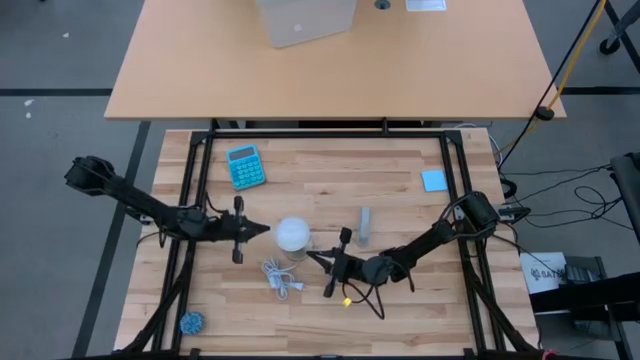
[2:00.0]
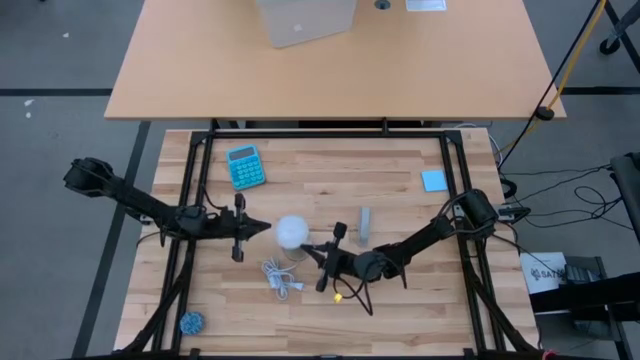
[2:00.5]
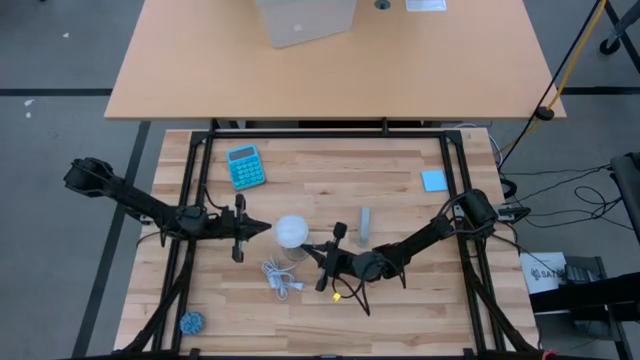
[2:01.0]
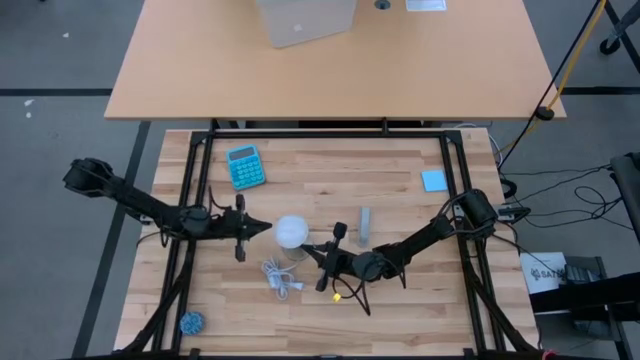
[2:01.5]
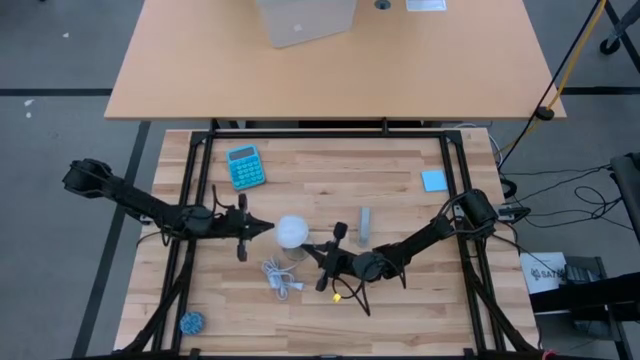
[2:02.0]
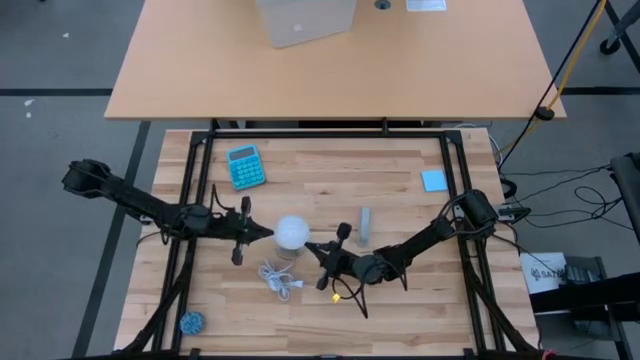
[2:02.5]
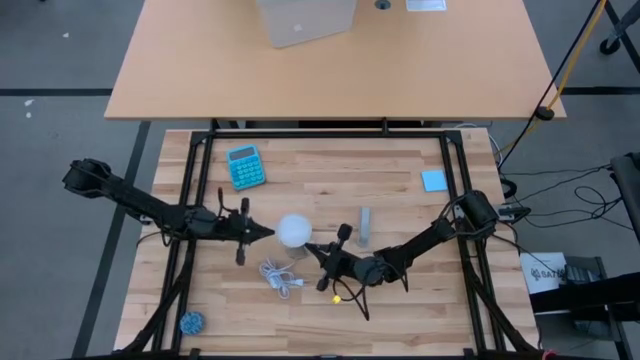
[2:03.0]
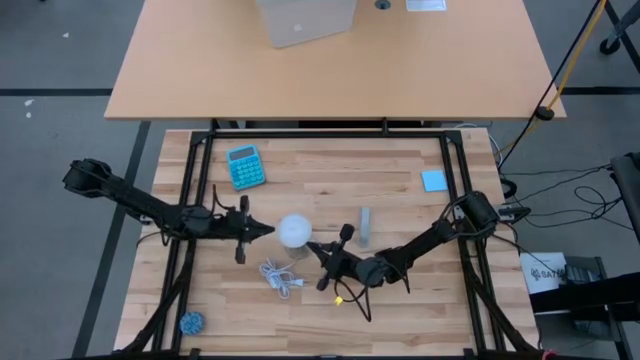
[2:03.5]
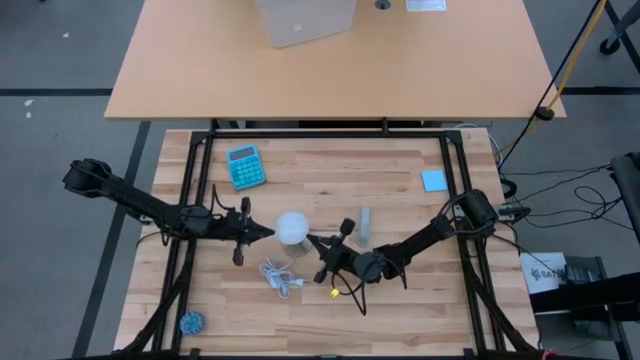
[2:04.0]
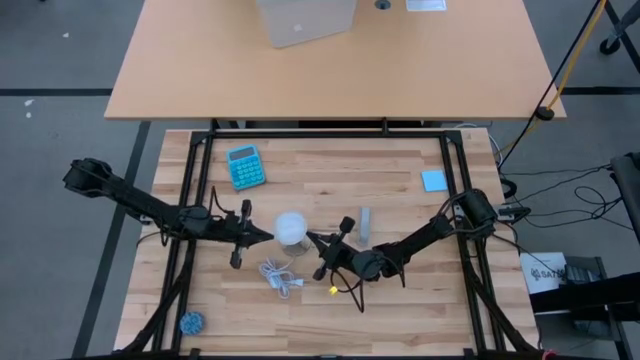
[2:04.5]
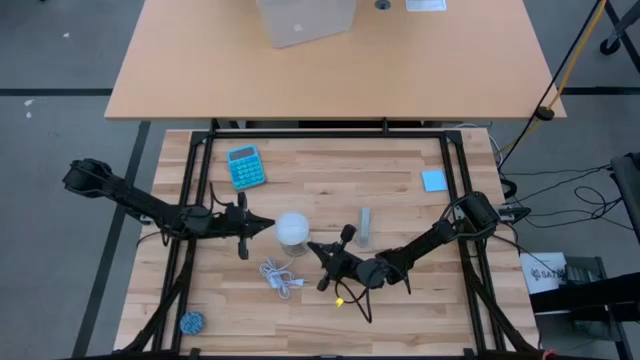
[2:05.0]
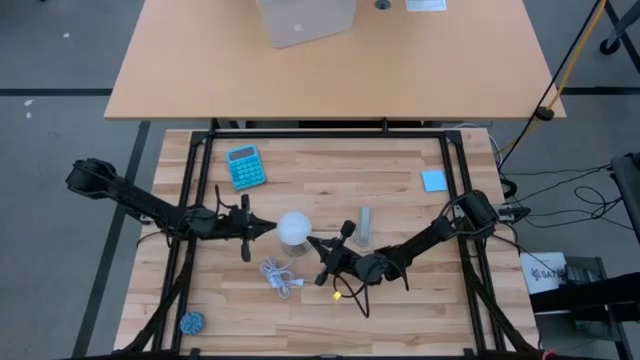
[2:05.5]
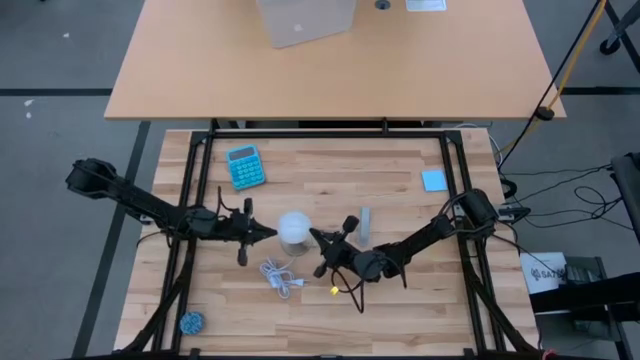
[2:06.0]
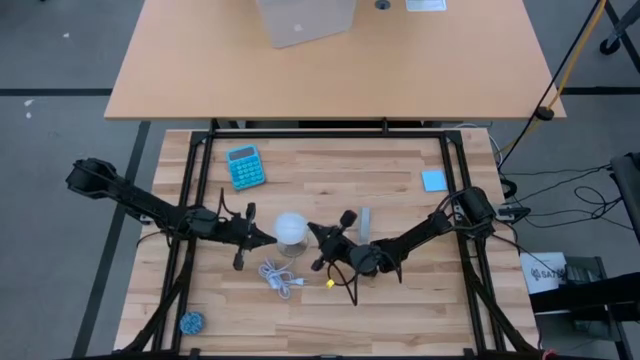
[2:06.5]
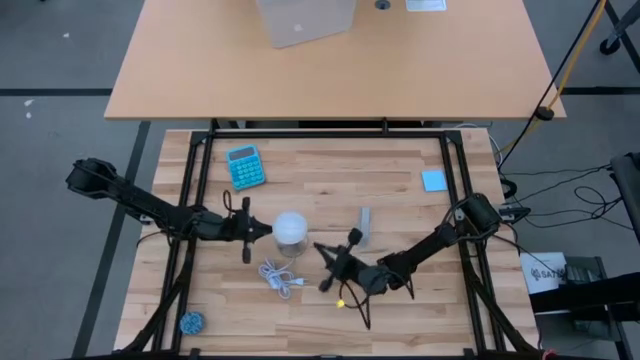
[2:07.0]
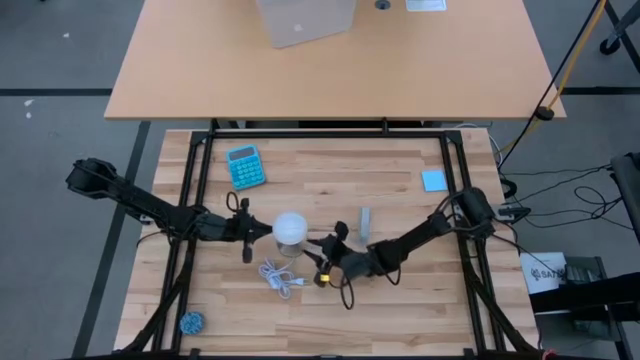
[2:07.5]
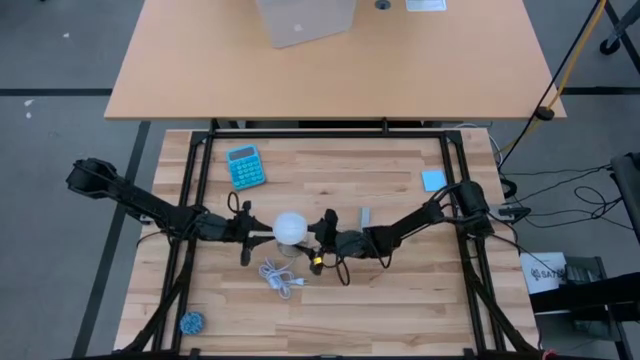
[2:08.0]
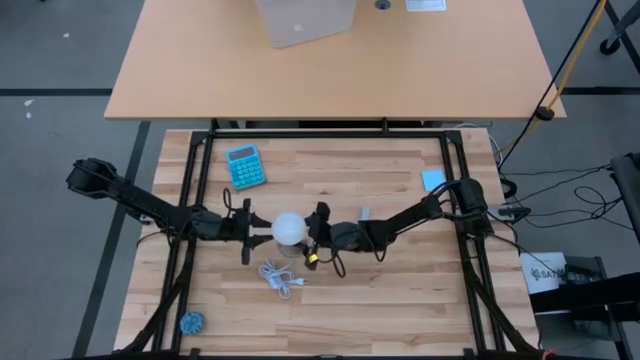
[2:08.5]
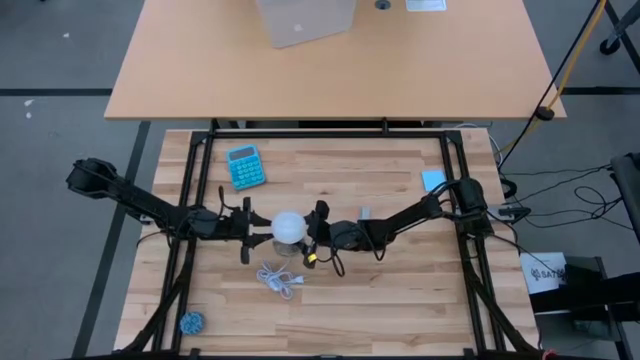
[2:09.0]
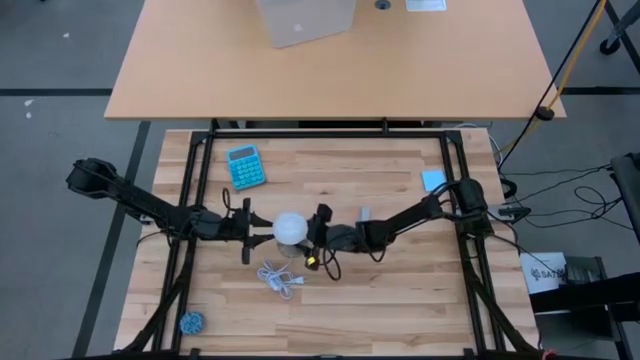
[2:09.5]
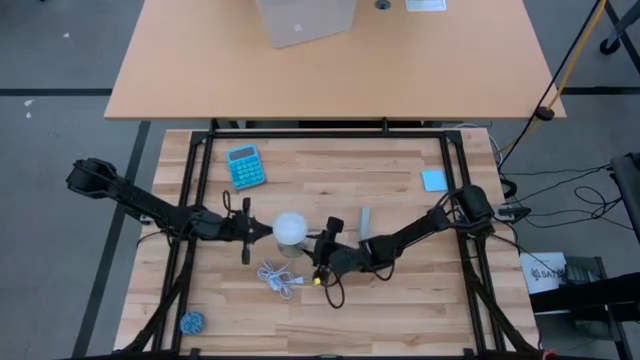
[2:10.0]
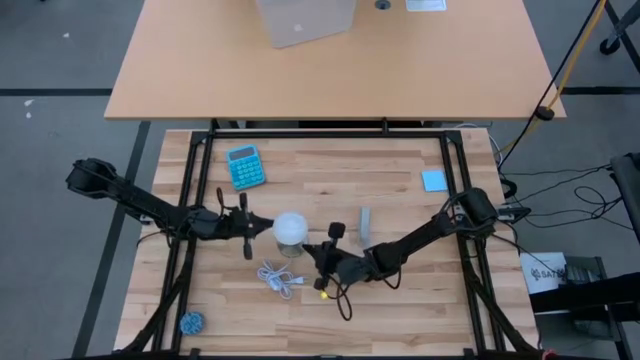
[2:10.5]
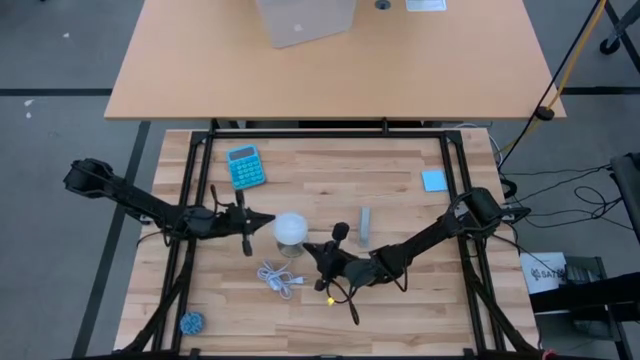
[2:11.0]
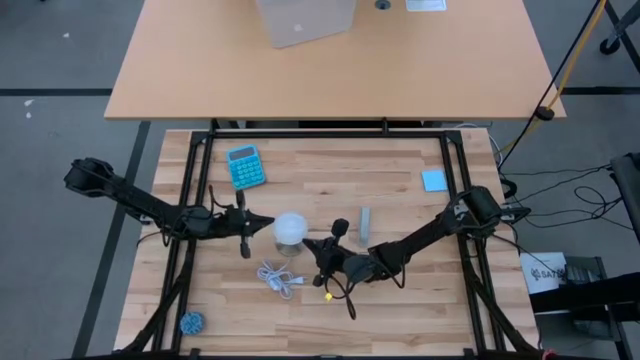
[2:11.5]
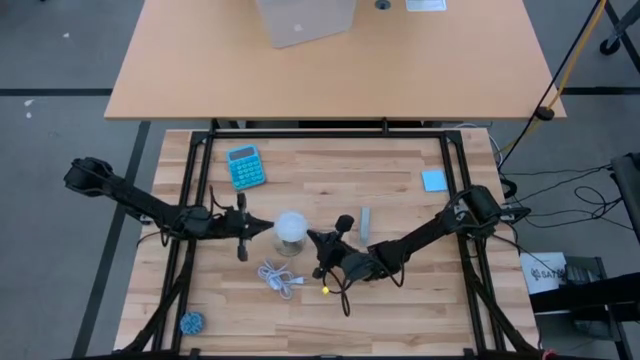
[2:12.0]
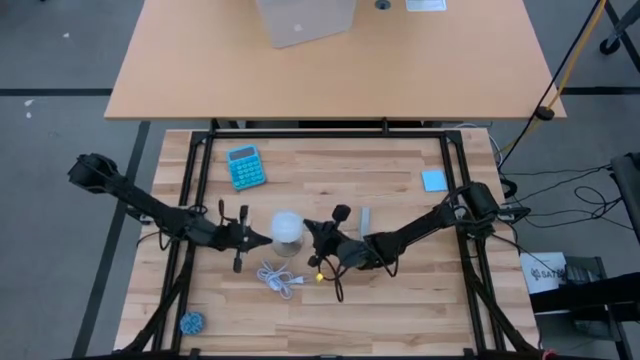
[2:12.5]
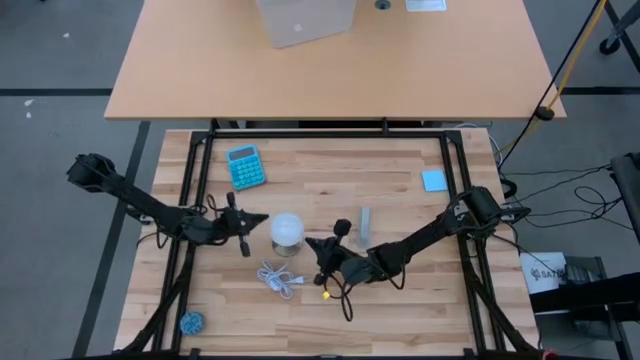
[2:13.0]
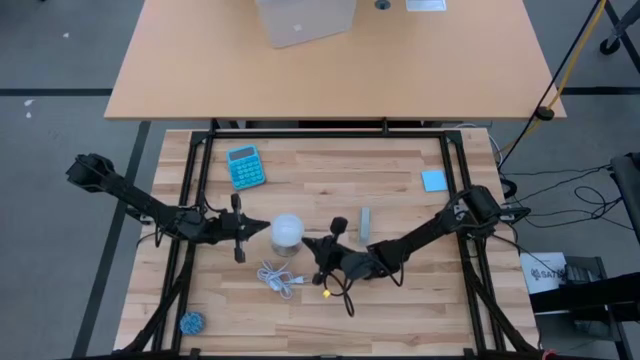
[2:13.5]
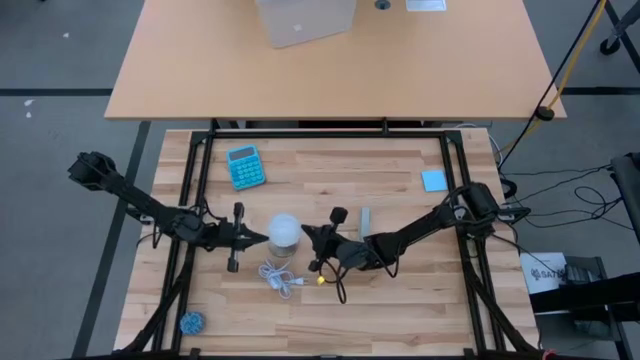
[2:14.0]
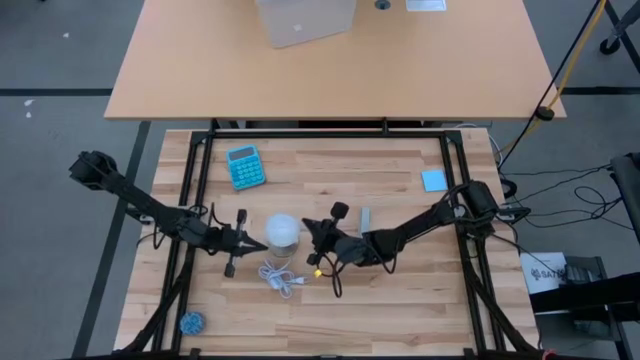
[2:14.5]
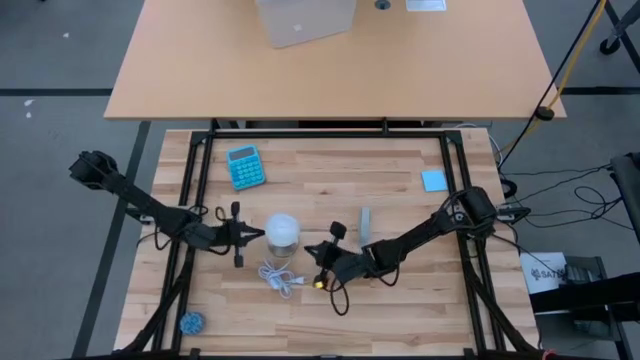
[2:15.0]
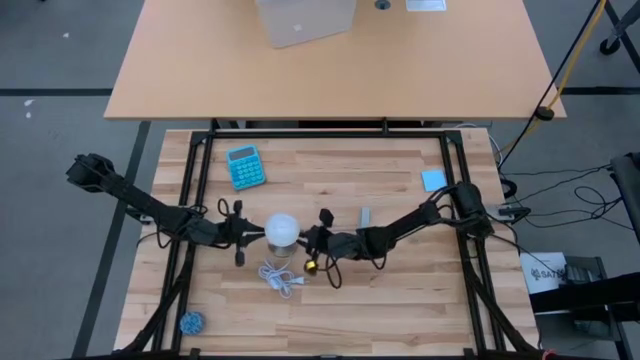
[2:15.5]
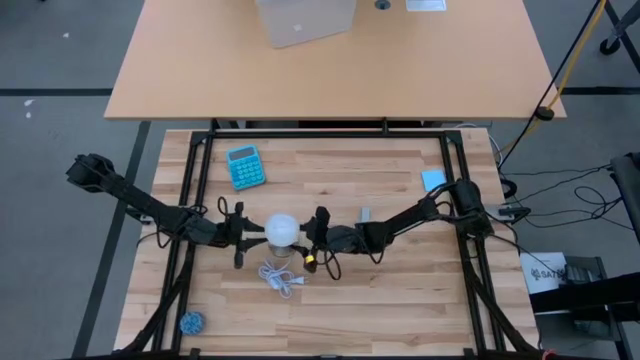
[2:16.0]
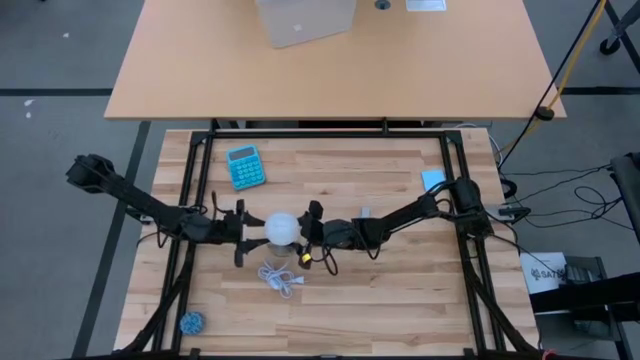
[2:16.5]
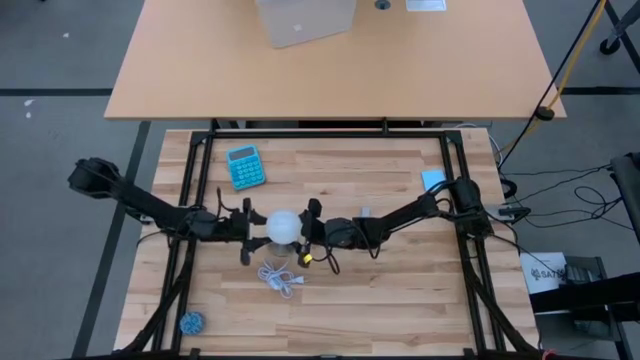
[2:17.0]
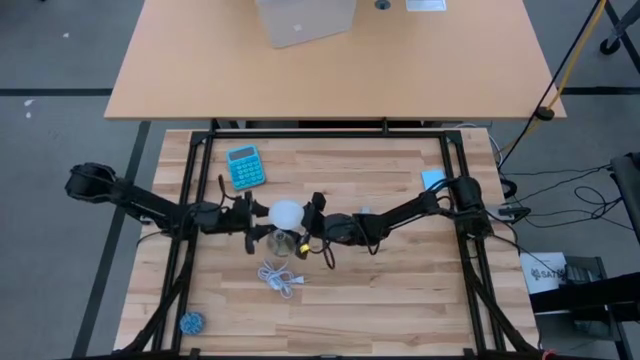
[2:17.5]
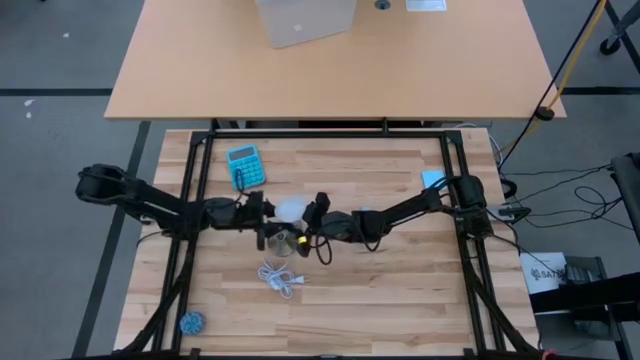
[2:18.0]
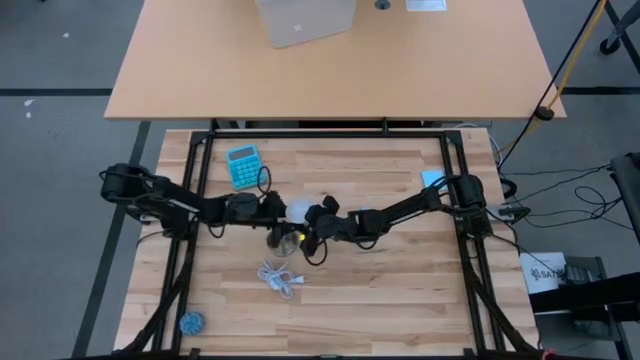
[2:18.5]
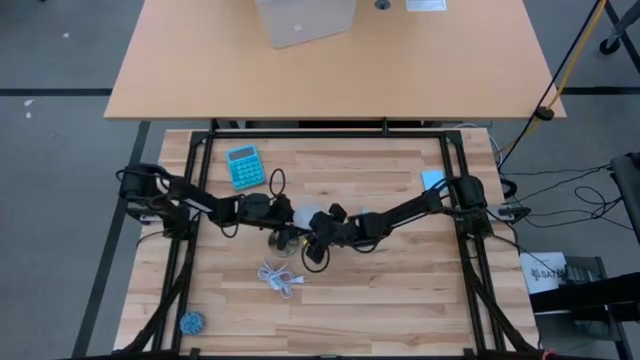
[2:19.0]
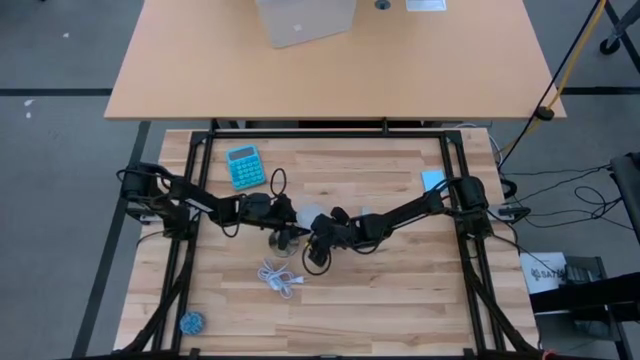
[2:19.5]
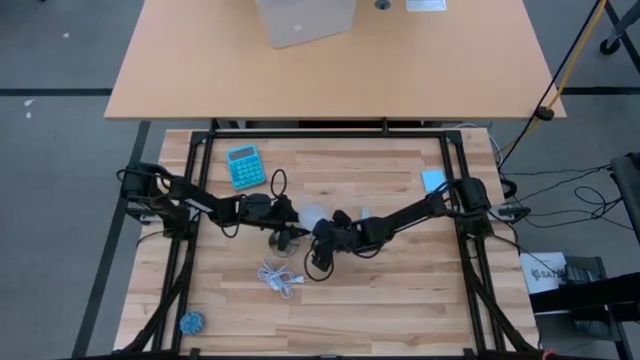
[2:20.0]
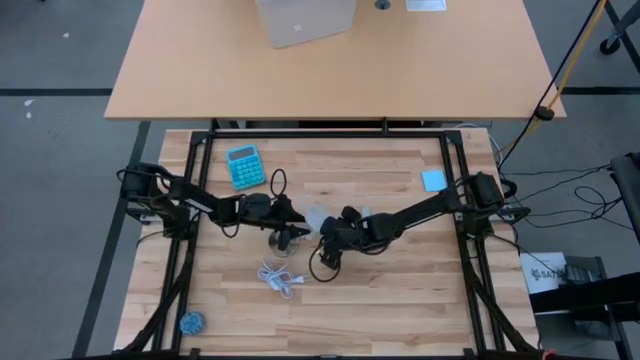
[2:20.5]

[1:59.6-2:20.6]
Task: Screw lightbulb
Remove the light bulb from the lamp
